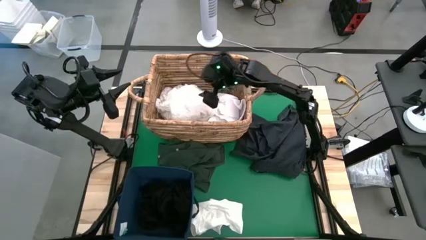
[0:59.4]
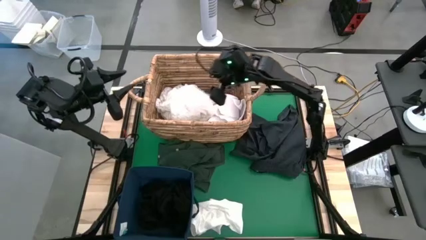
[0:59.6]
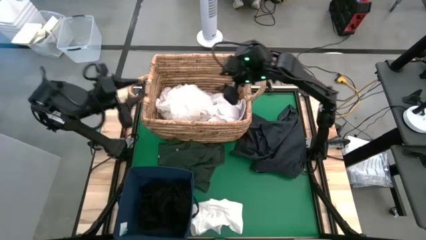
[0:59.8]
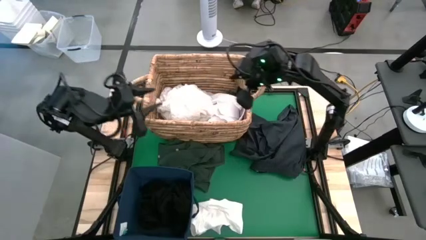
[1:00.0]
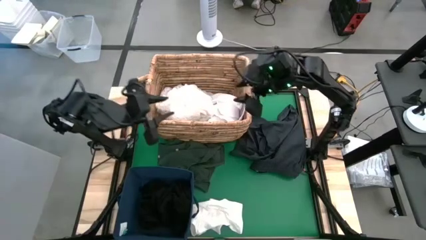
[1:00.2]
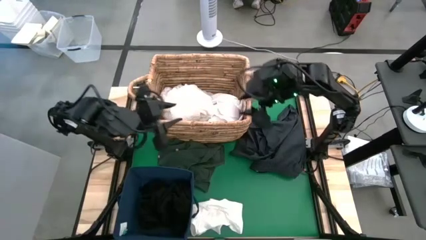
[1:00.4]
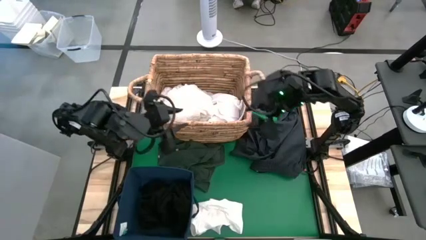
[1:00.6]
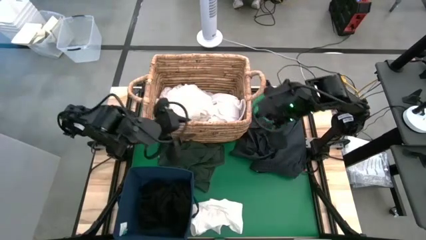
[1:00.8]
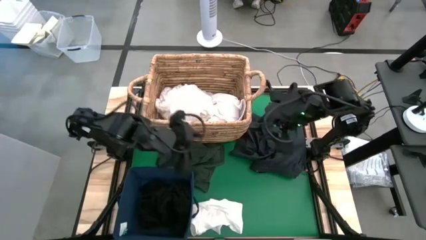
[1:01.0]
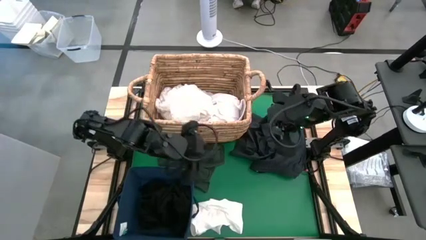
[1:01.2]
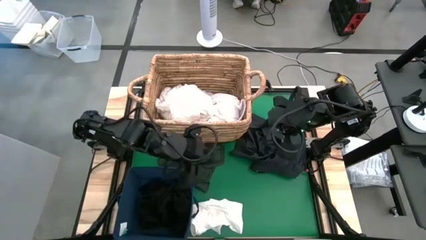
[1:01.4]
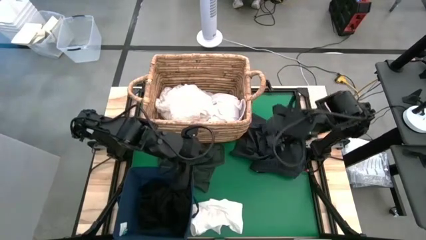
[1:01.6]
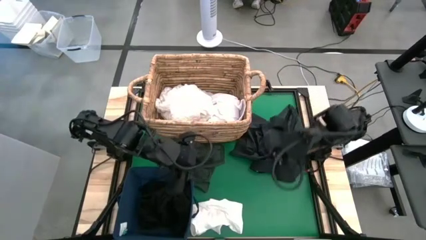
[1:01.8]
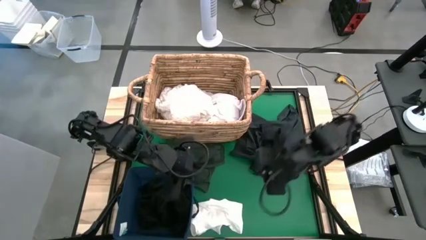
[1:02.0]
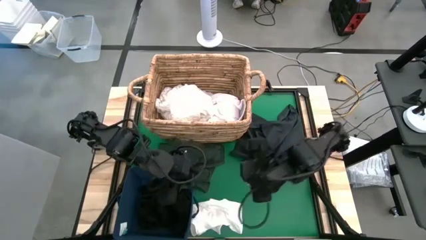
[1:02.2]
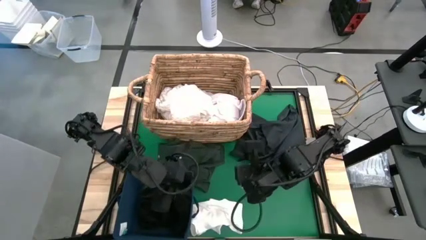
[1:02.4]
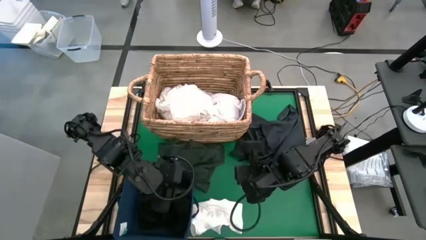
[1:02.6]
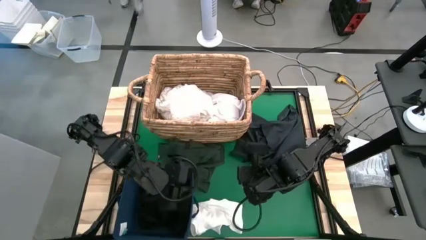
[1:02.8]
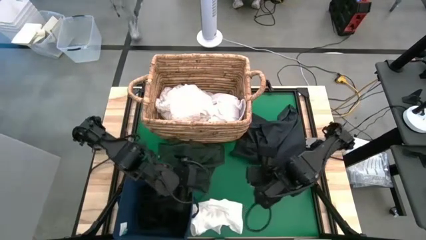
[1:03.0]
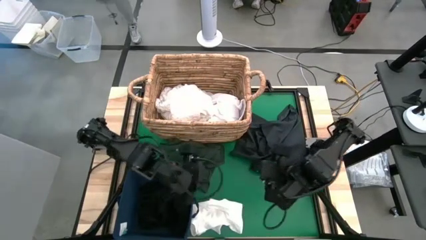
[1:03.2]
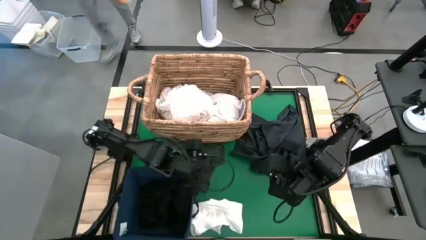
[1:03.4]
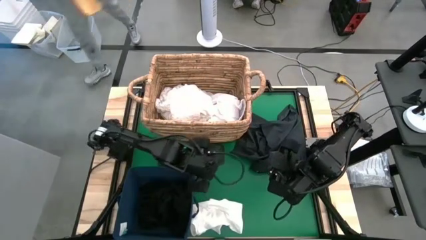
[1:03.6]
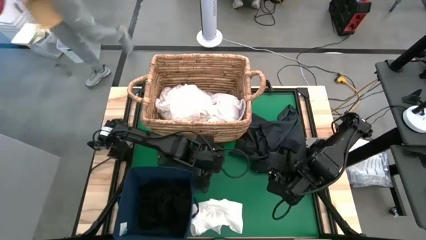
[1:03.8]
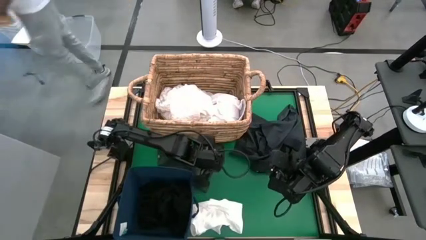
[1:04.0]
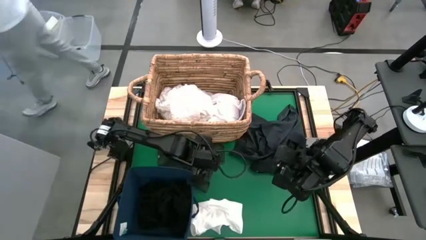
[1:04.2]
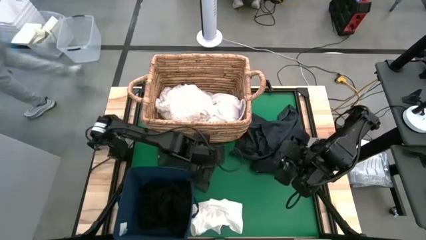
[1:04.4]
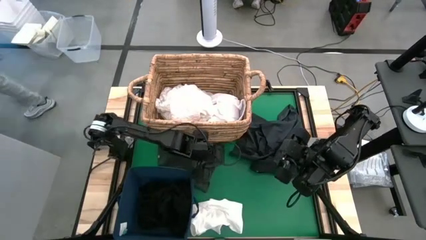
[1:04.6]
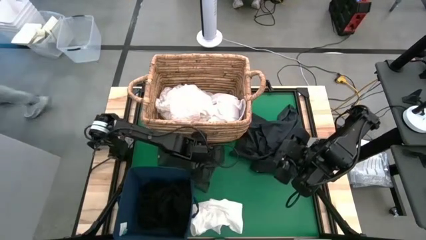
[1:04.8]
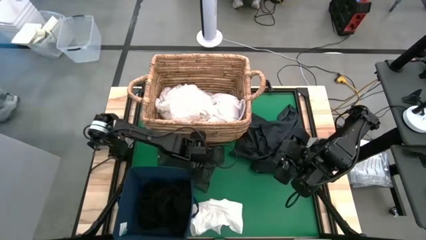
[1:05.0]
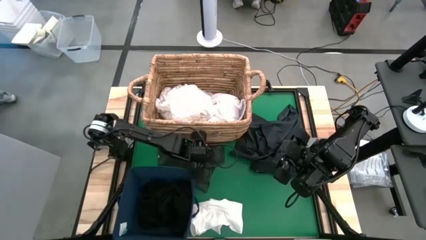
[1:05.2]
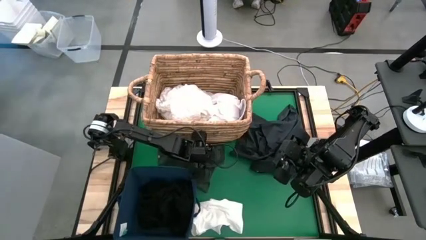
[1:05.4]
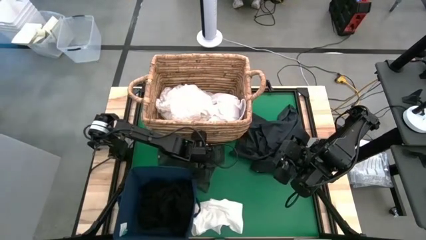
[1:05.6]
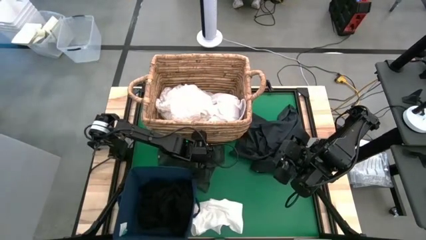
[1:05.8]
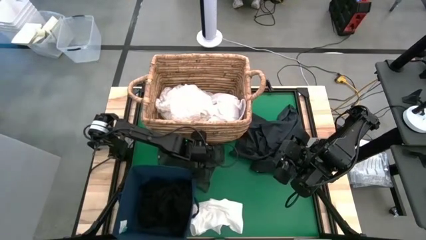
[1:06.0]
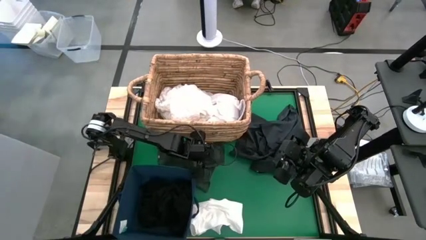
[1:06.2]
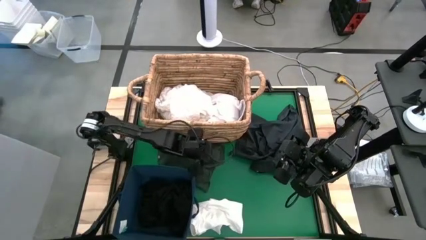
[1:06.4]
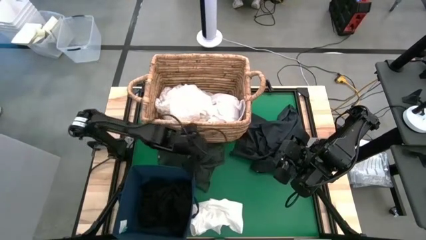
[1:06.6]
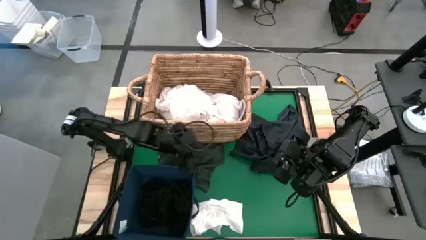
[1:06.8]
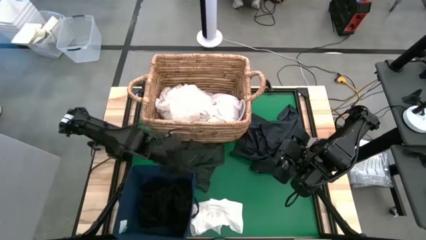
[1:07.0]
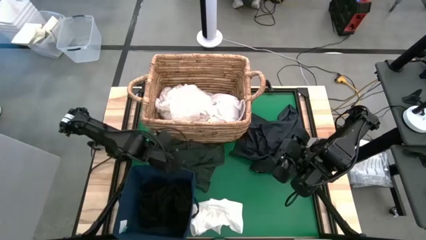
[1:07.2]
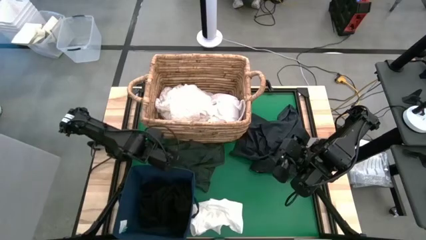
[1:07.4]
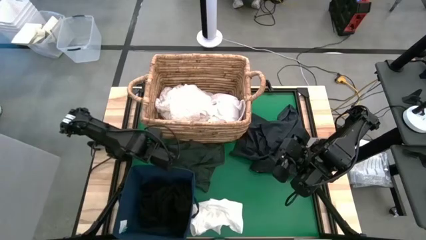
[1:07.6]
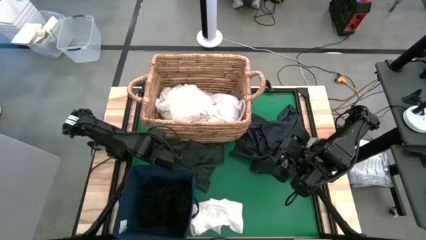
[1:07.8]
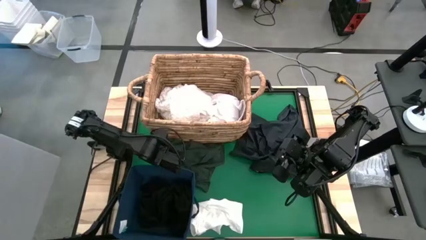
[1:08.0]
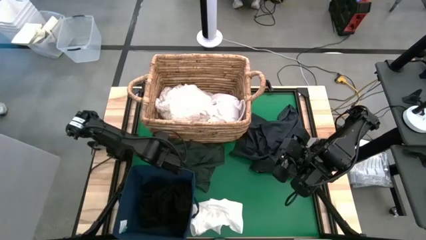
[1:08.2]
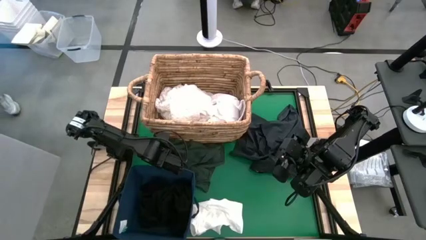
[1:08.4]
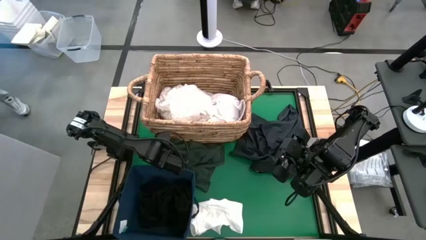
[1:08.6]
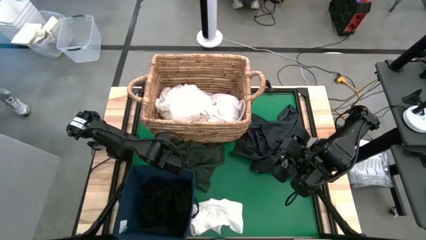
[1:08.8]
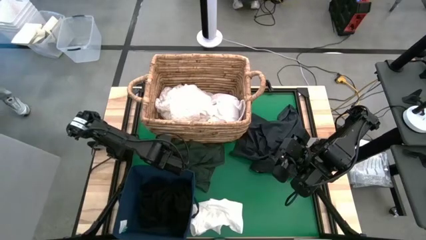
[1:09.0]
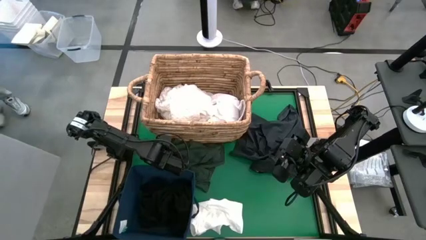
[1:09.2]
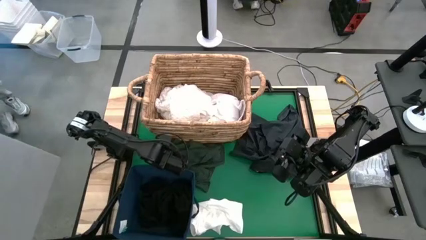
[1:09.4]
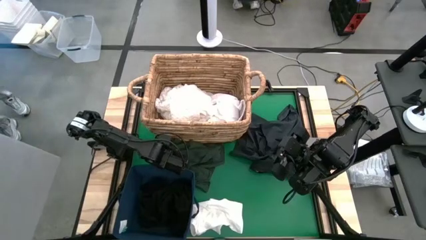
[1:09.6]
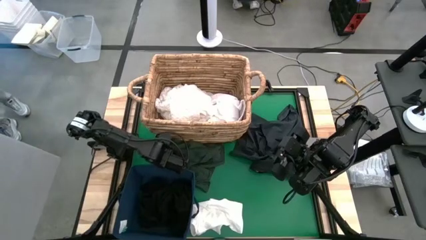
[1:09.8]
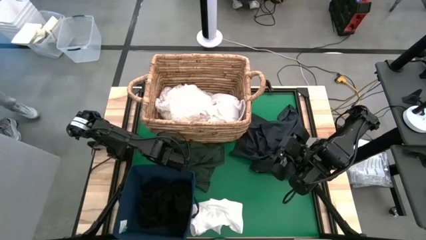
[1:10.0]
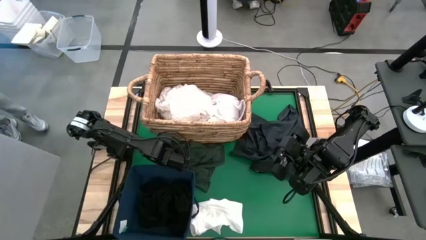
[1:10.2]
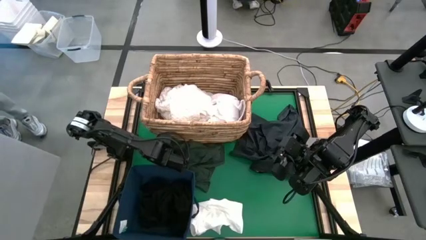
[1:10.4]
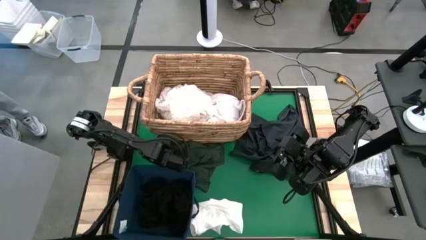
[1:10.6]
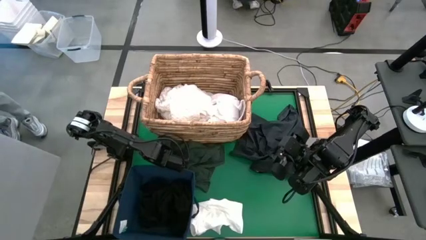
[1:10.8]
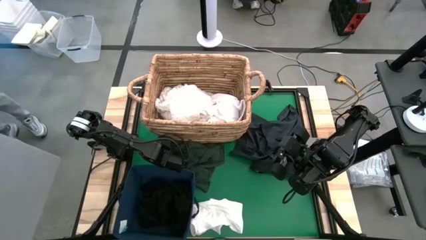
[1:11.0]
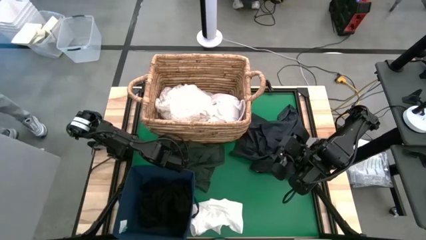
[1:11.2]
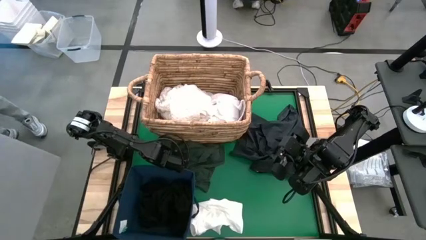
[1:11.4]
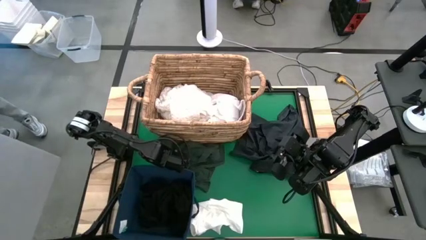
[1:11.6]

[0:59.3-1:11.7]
Put the green shirt into the laundry bin
